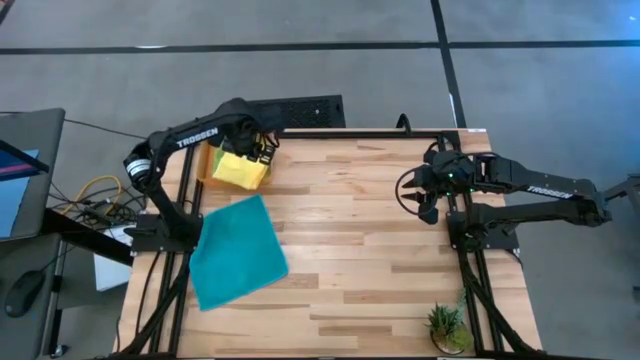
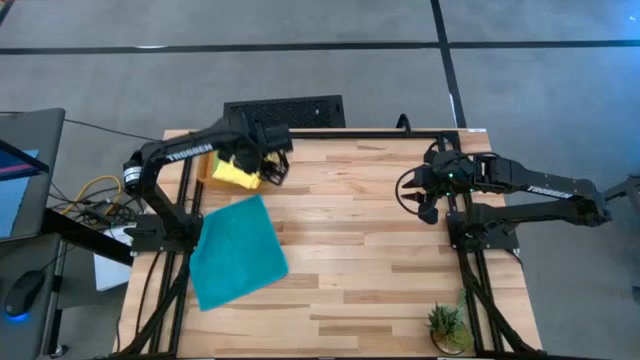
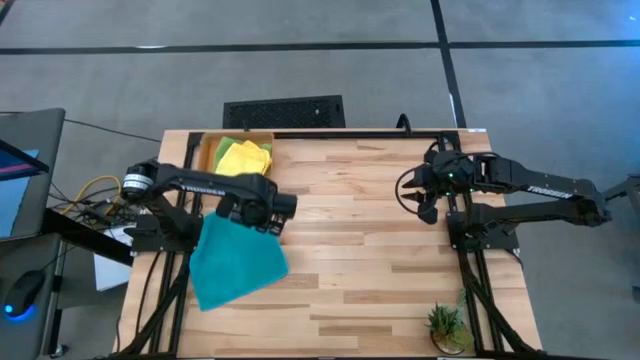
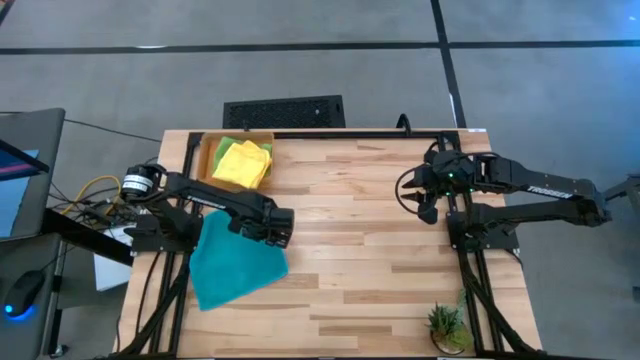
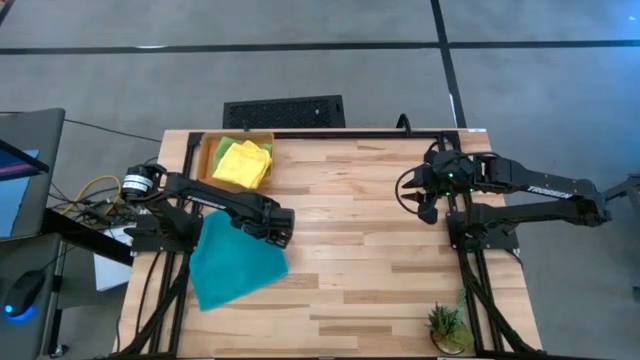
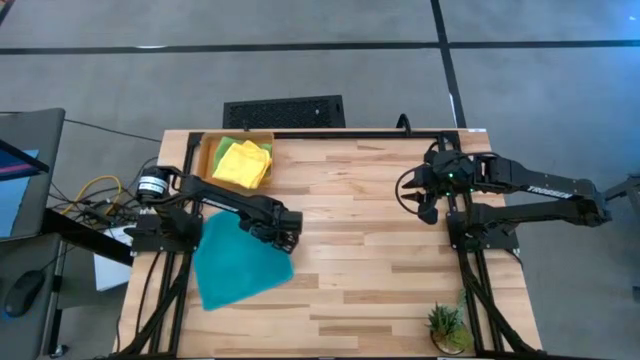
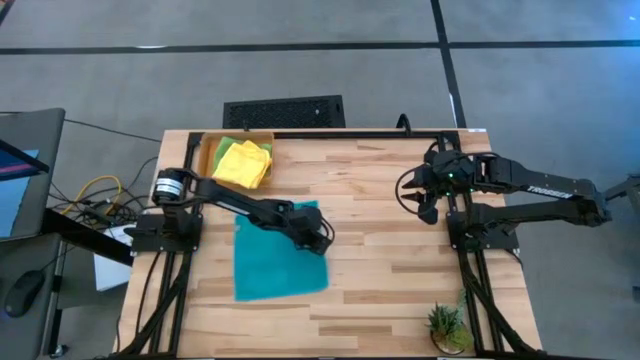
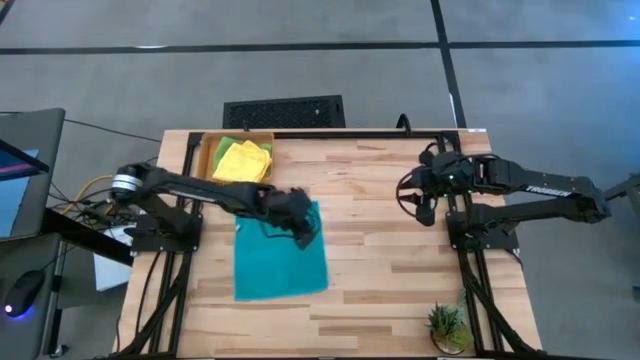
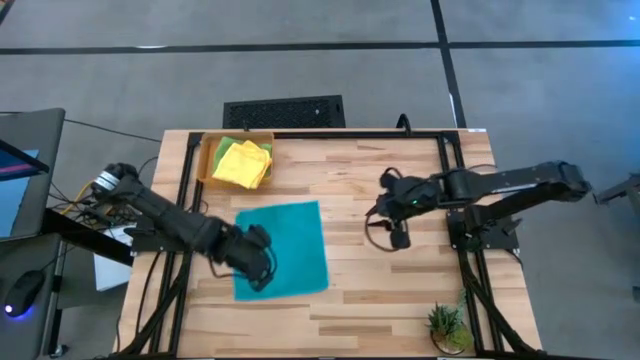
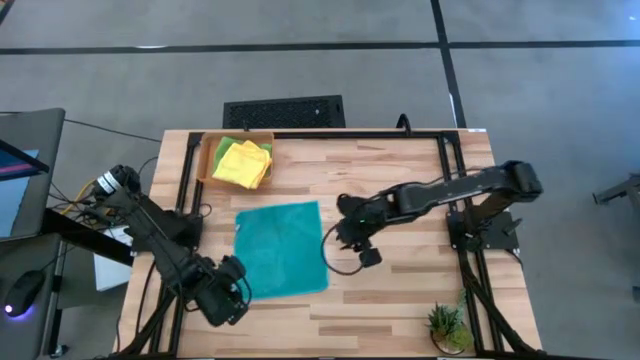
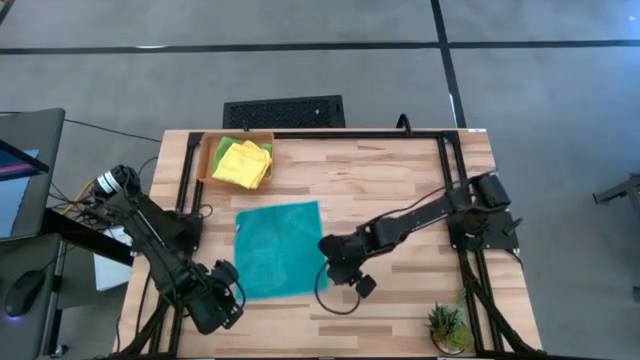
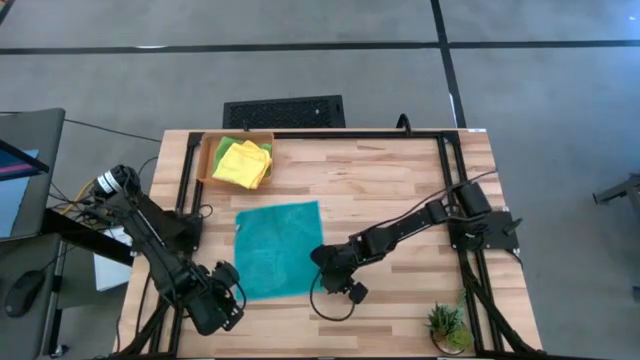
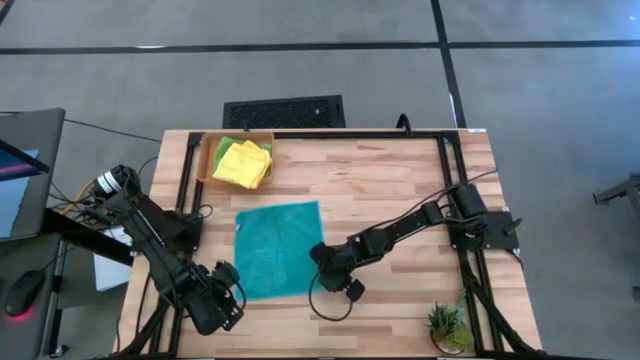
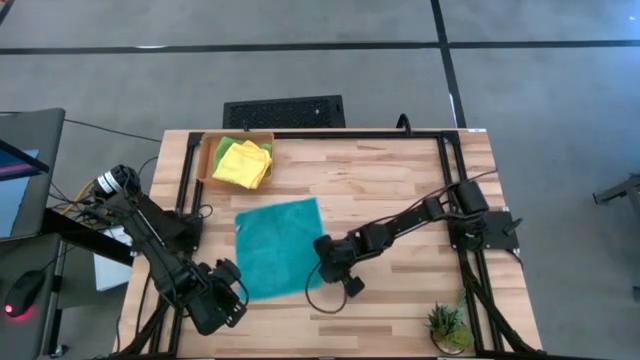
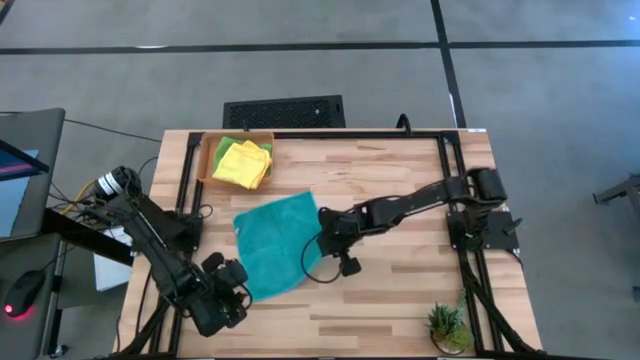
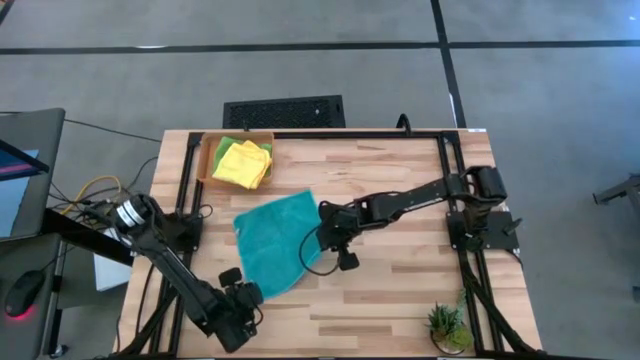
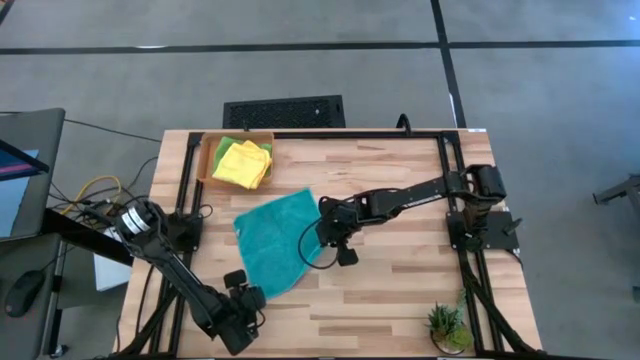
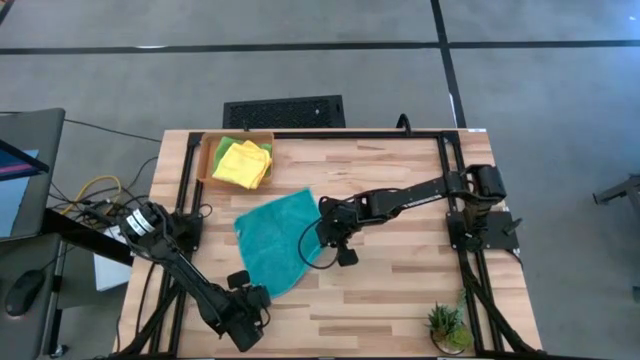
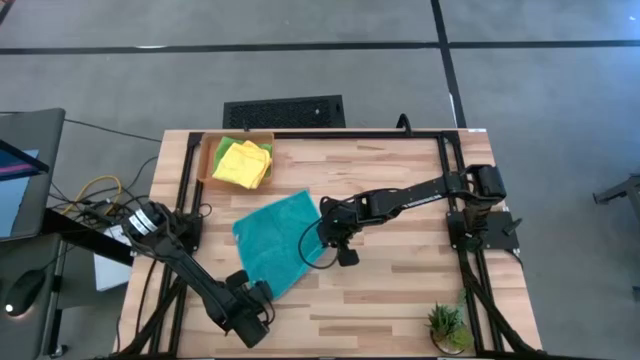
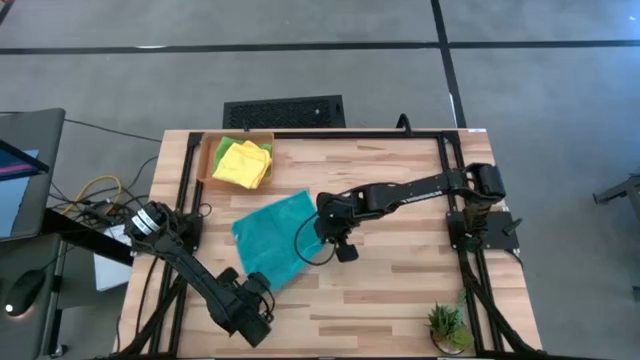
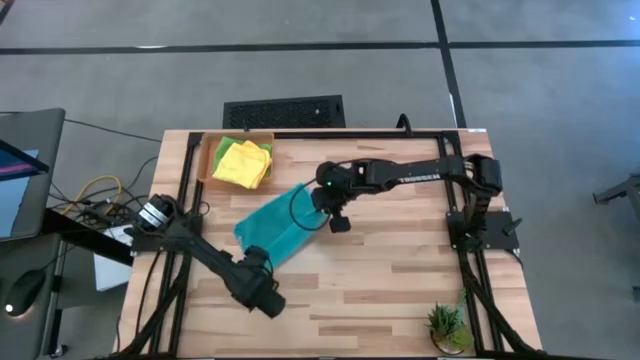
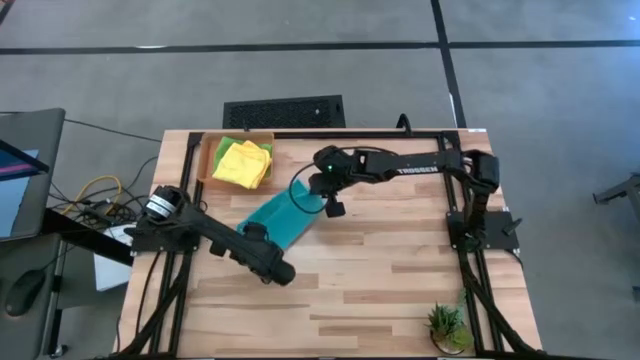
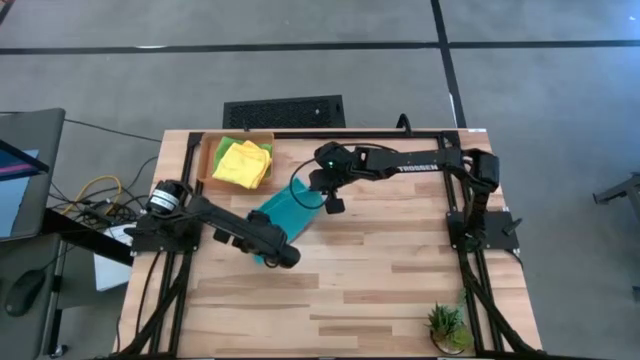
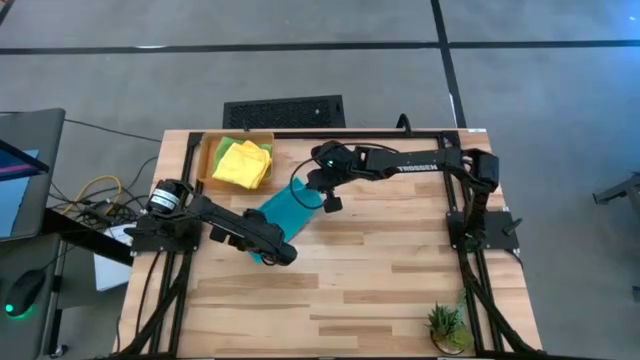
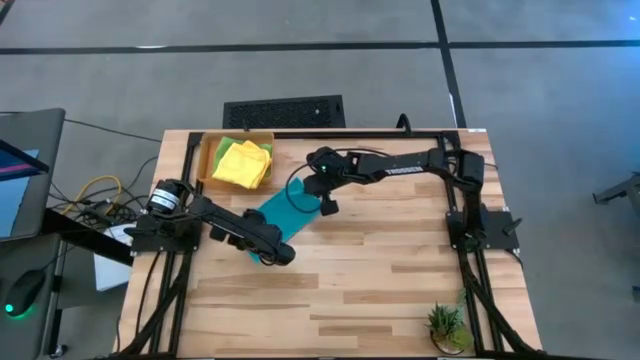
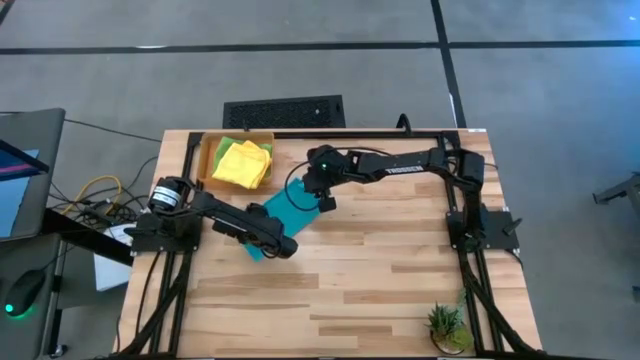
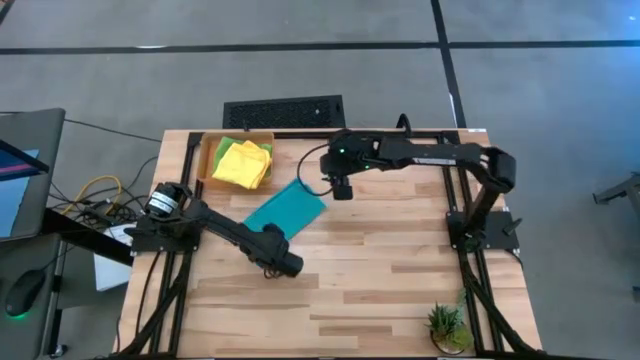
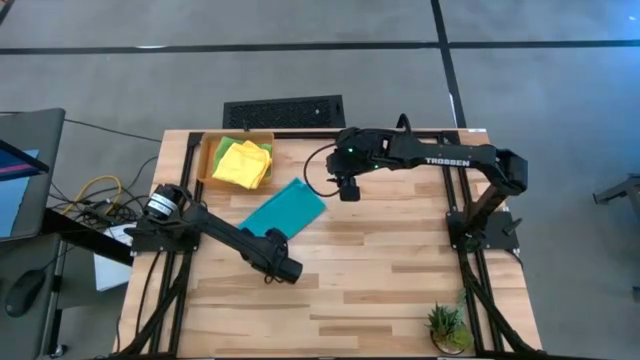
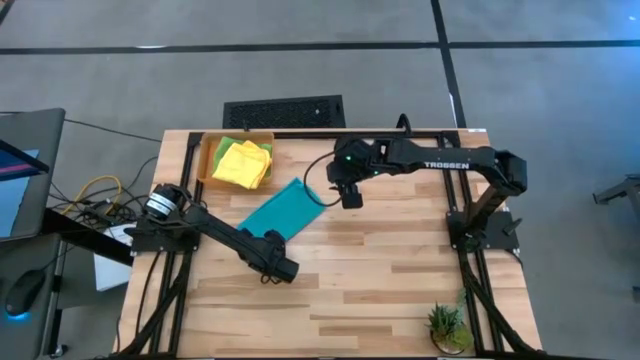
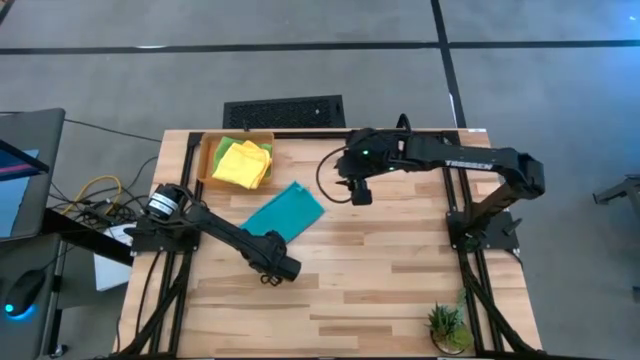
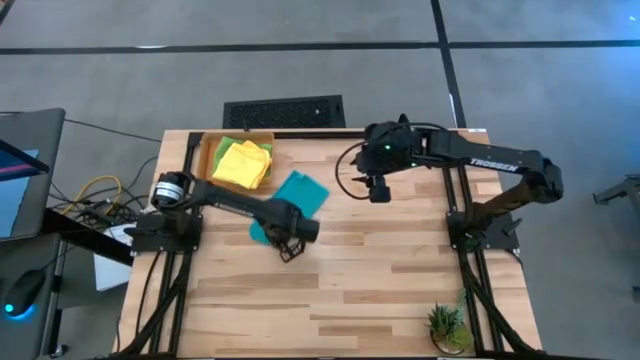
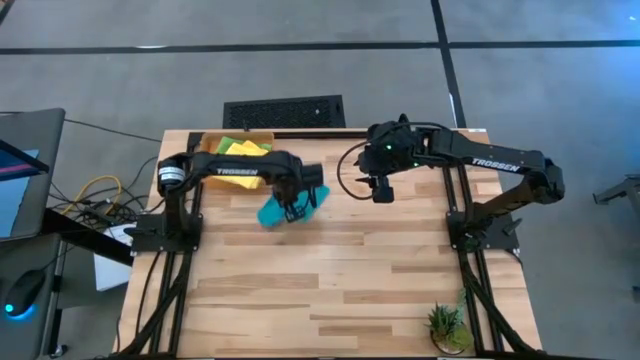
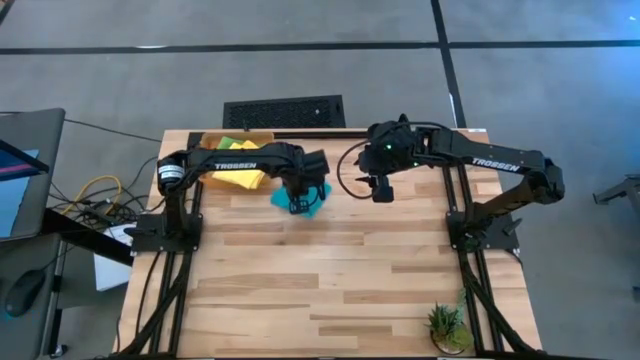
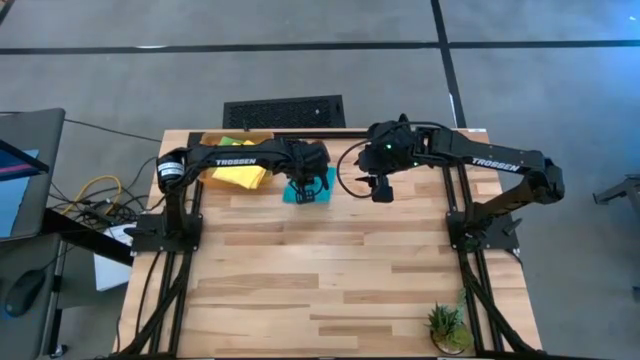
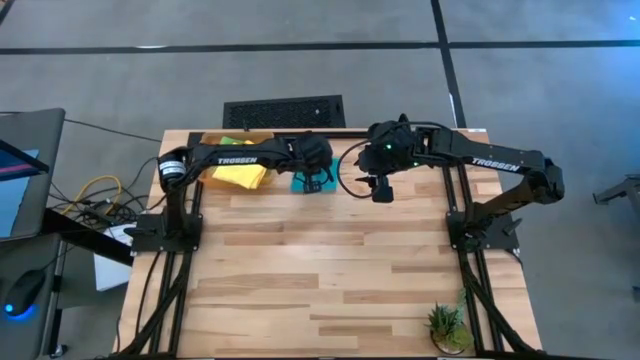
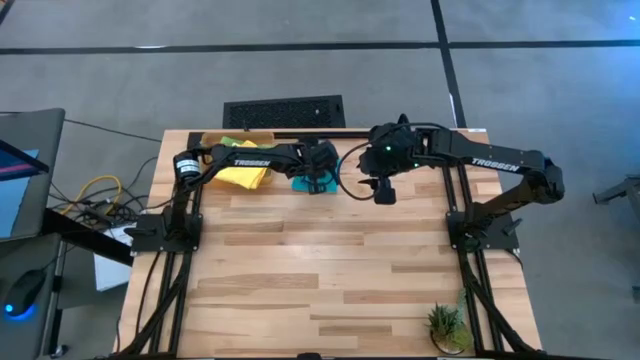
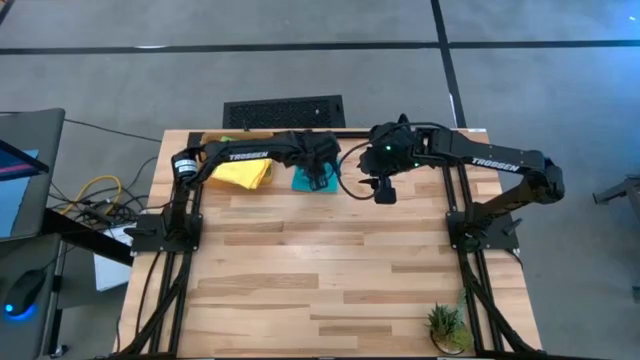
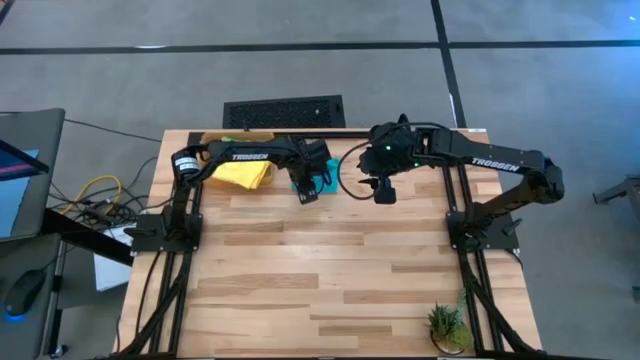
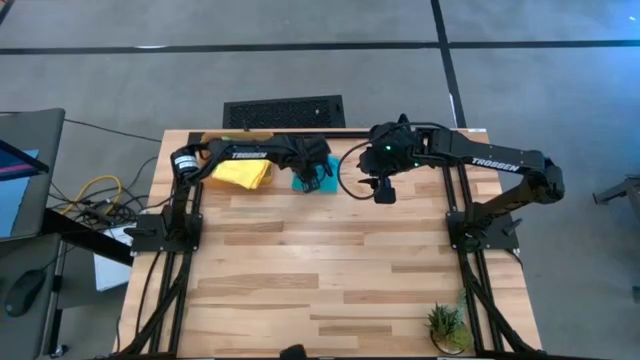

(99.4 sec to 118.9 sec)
Task: Fold microfiber towels
Fold the blue microfiber towel

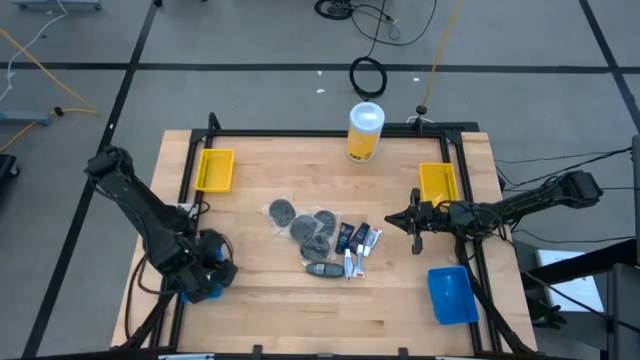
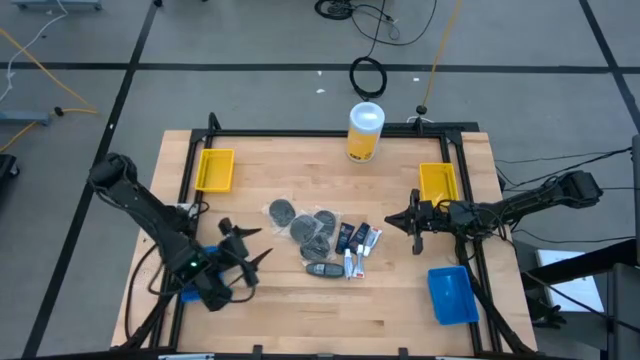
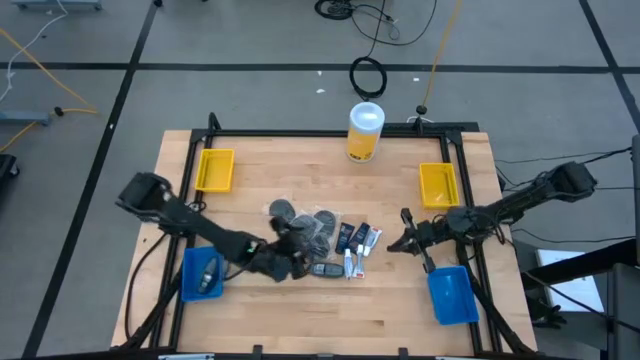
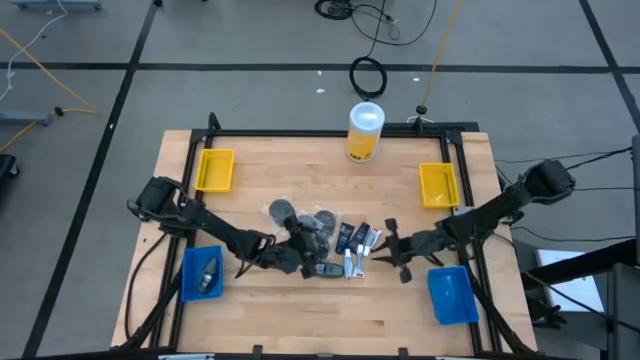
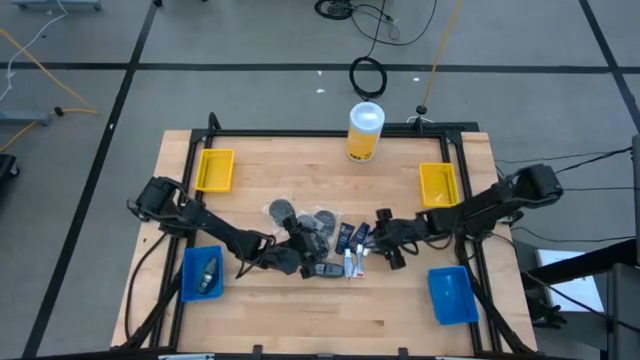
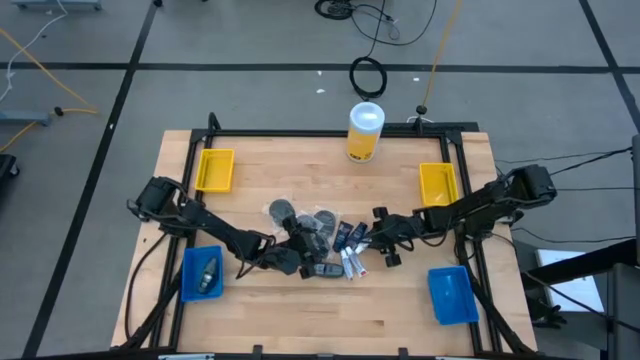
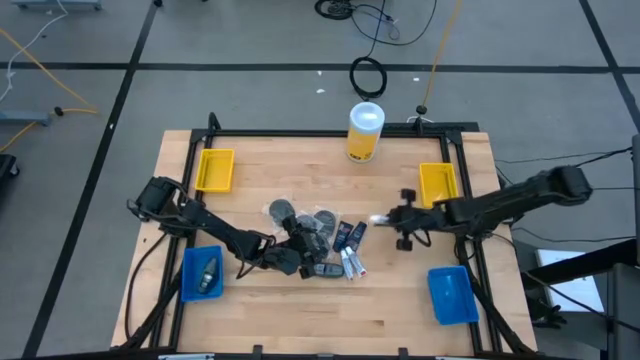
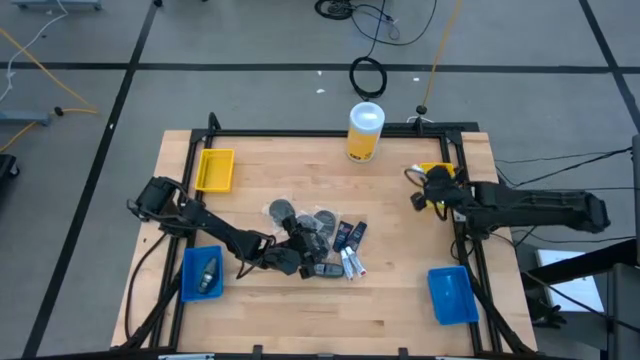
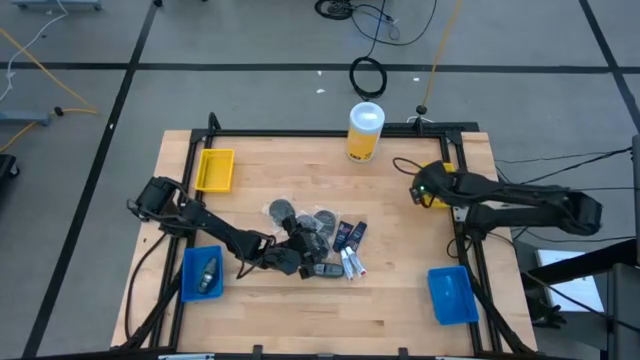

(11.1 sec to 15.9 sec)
Task: Pick & Place Travel size toiletries
Put the white toothpaste into the right yellow bin
